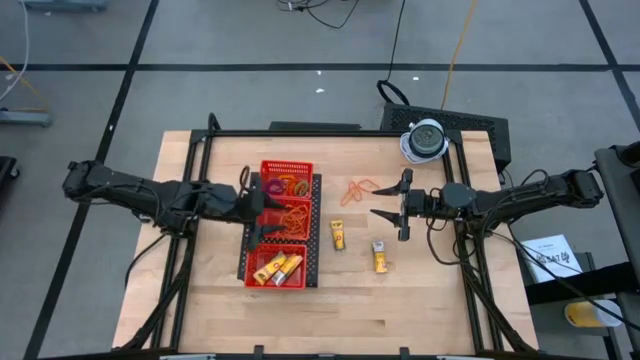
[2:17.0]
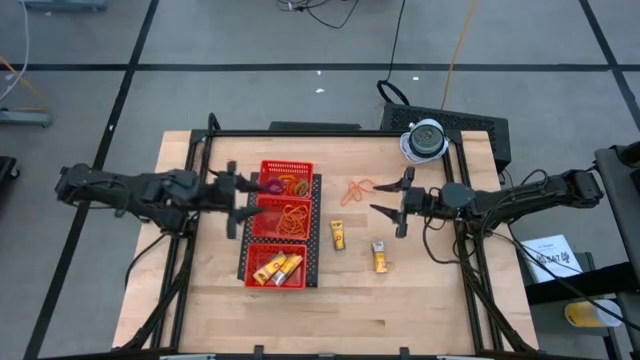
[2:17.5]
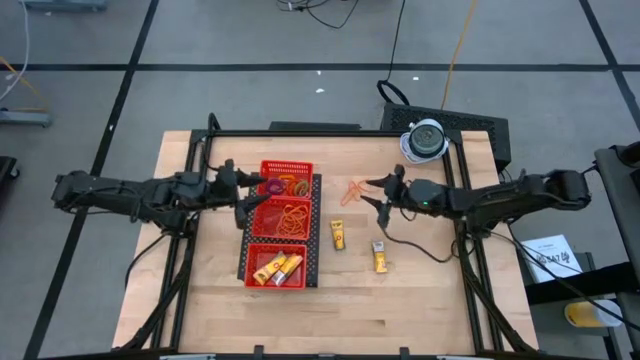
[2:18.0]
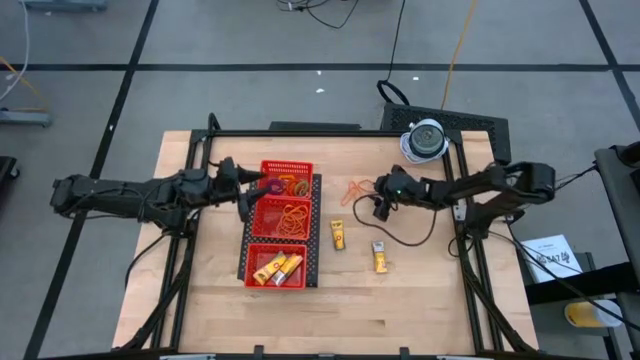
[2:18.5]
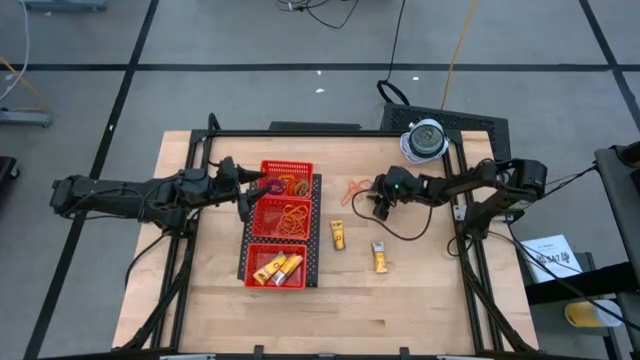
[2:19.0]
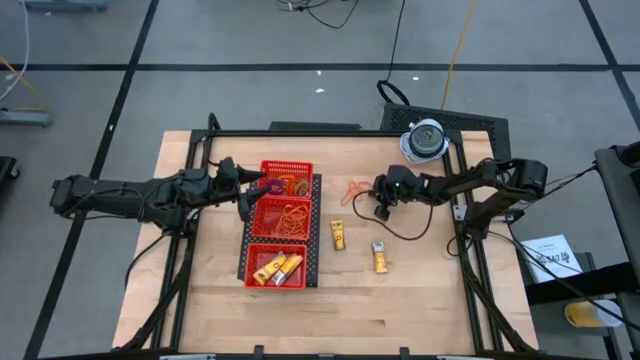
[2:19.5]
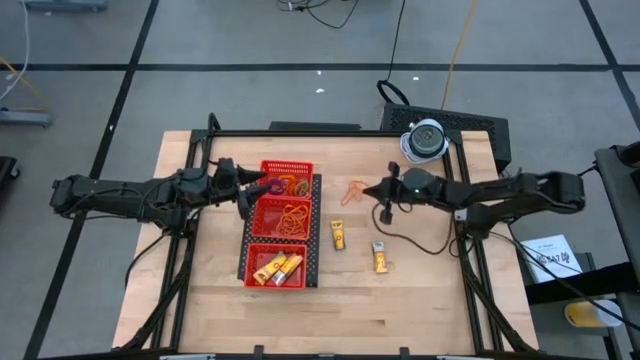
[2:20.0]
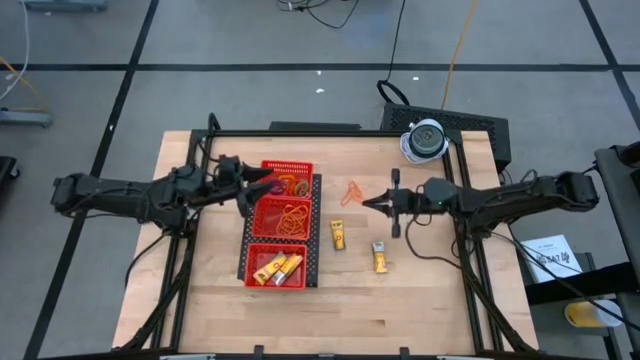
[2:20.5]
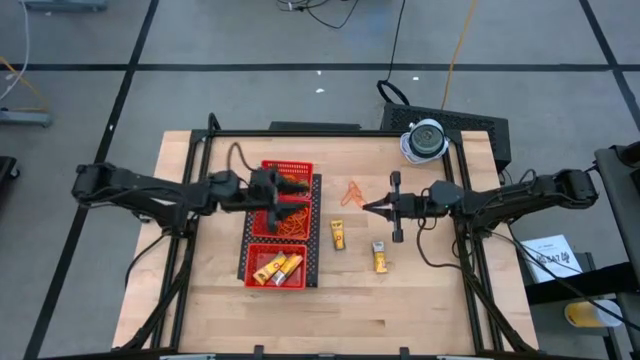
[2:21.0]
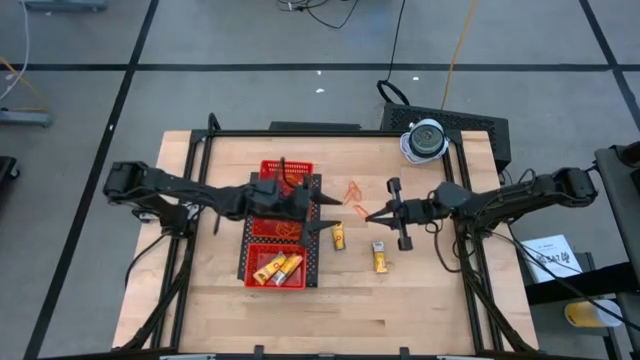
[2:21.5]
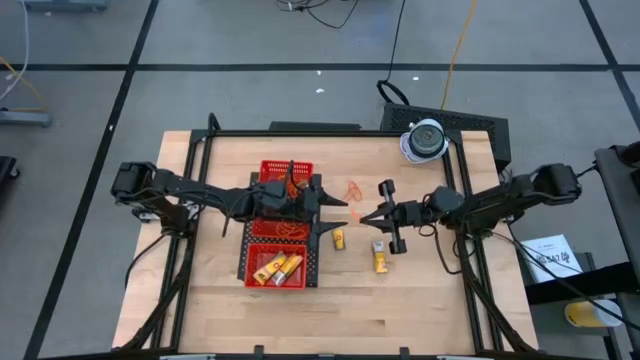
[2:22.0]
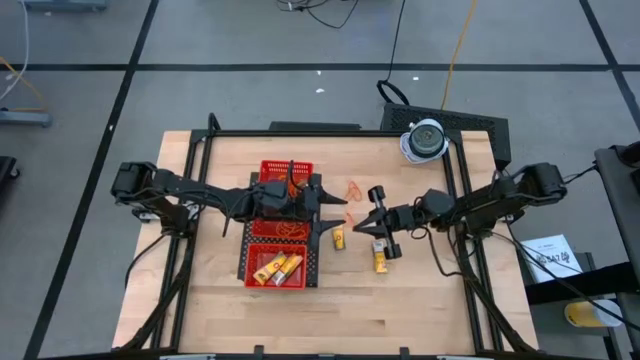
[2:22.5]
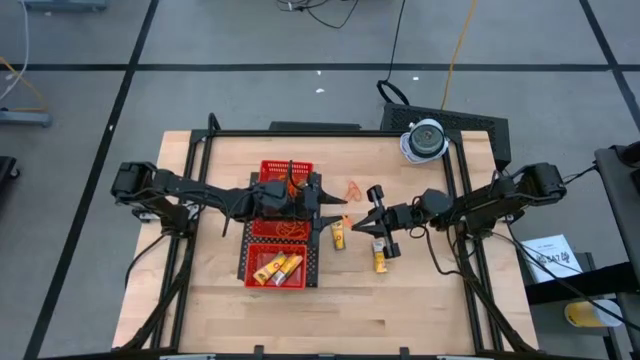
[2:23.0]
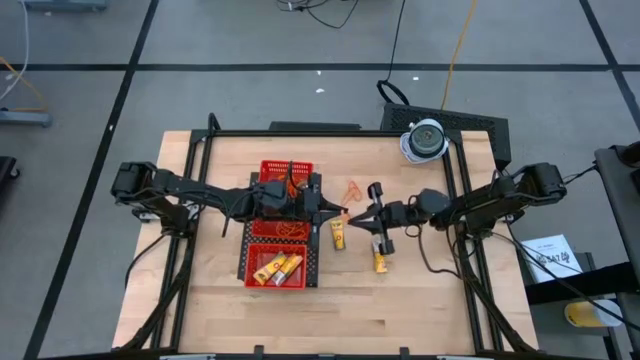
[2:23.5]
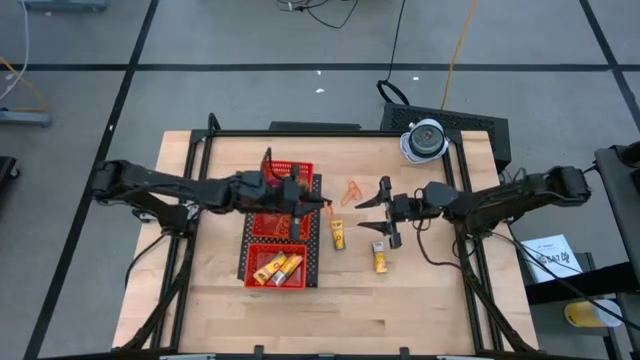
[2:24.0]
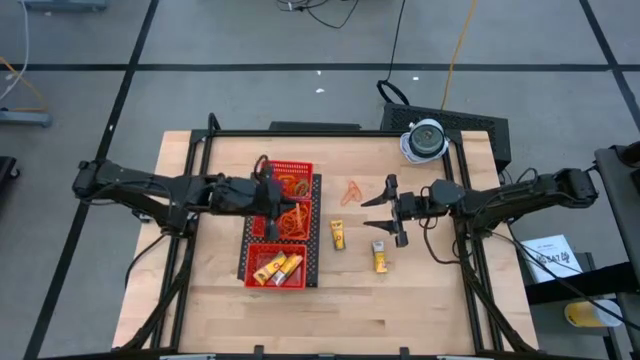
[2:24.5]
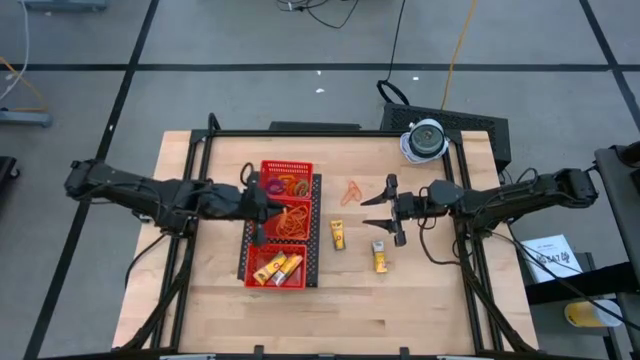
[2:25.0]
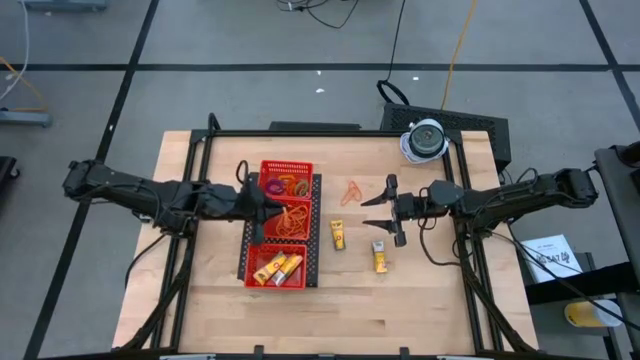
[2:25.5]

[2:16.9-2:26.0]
Task: Pick & Place Office Desk Supplies
Put the orange rubber band into the middle red basket on the shelf

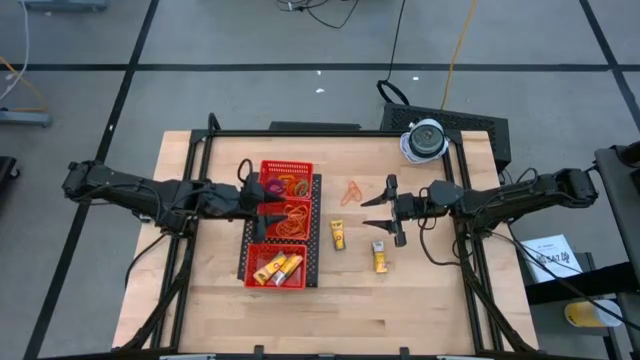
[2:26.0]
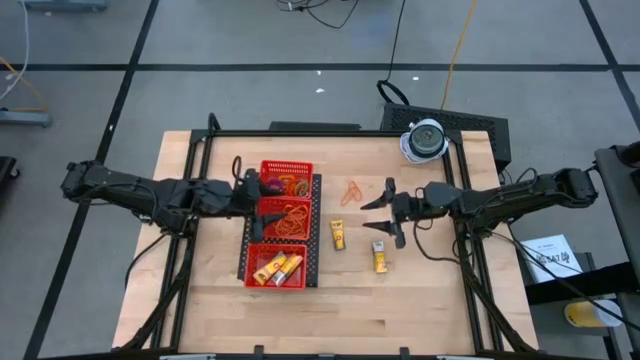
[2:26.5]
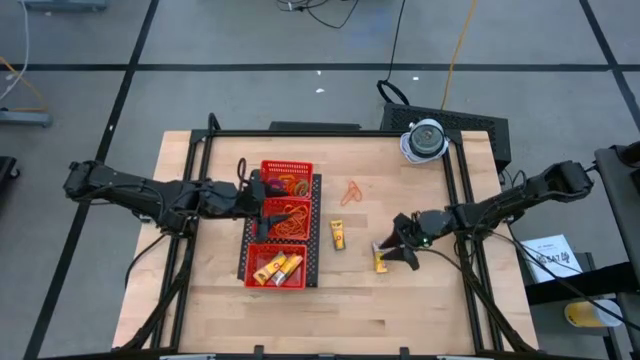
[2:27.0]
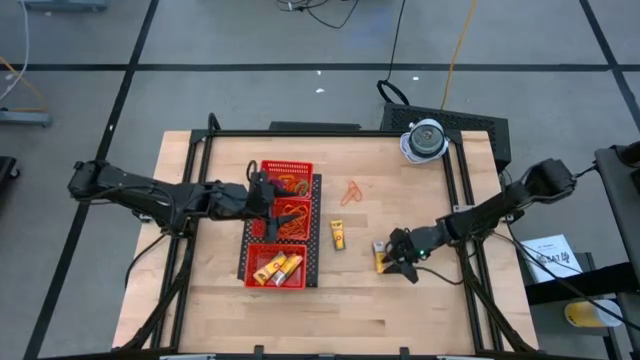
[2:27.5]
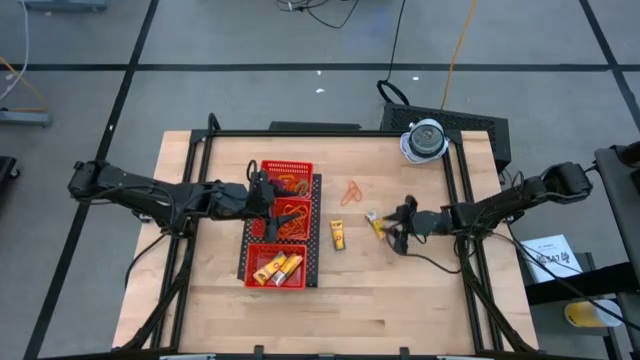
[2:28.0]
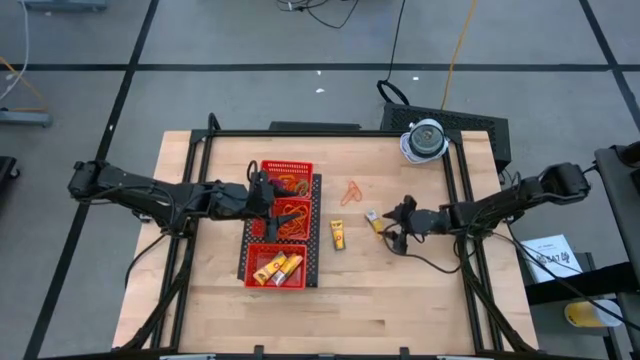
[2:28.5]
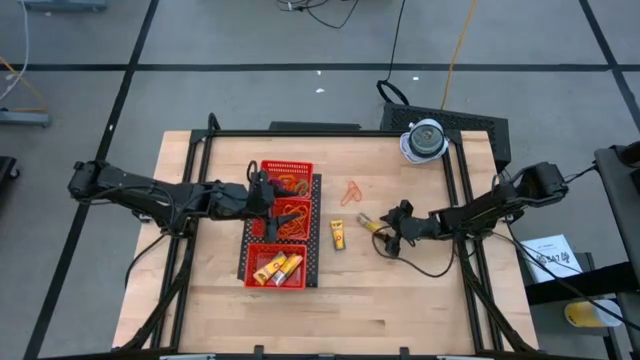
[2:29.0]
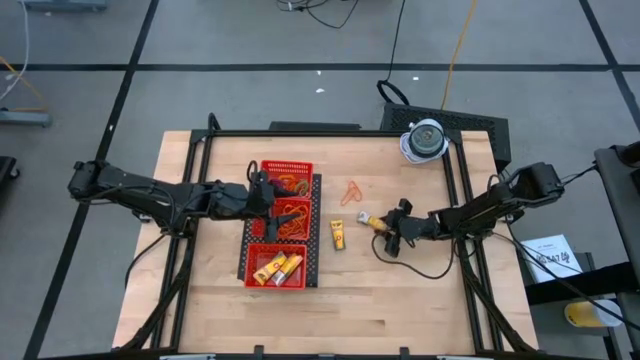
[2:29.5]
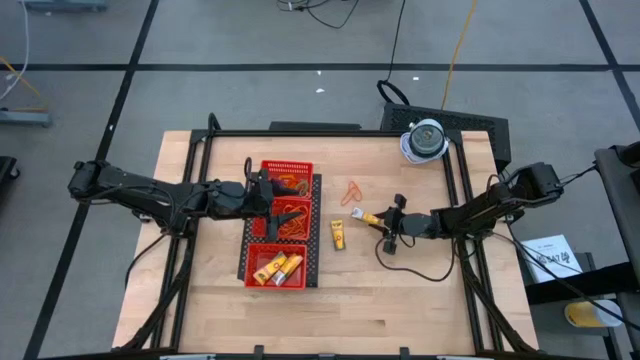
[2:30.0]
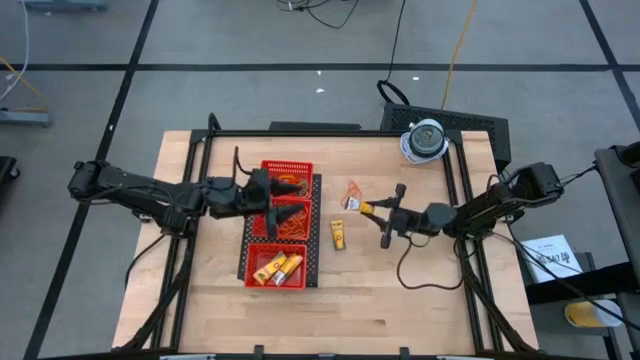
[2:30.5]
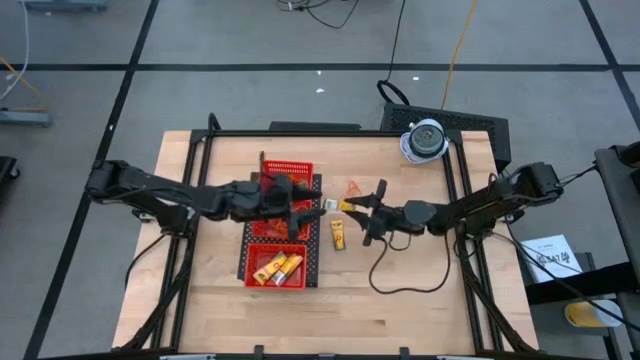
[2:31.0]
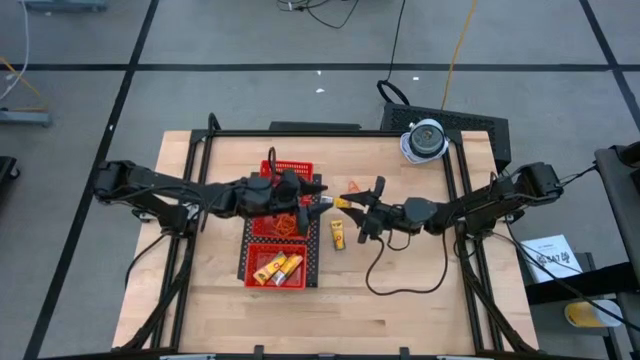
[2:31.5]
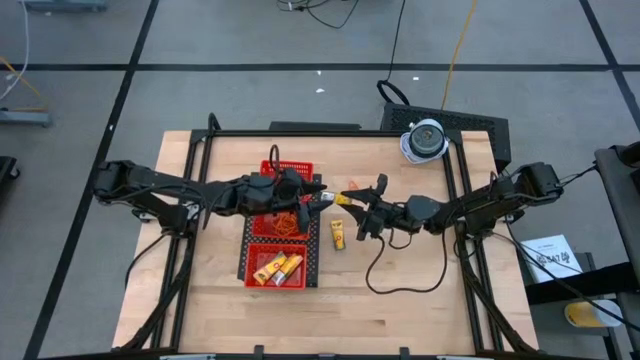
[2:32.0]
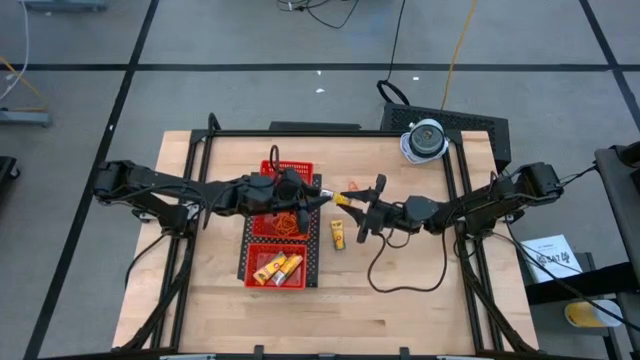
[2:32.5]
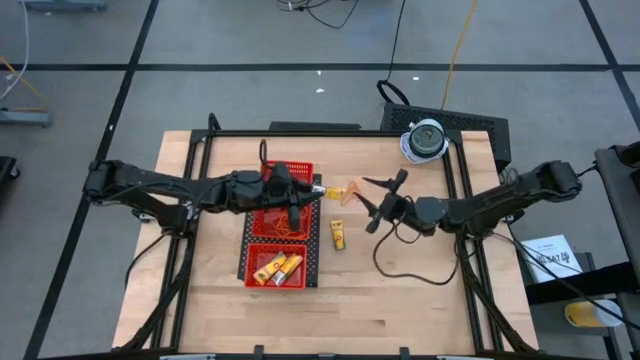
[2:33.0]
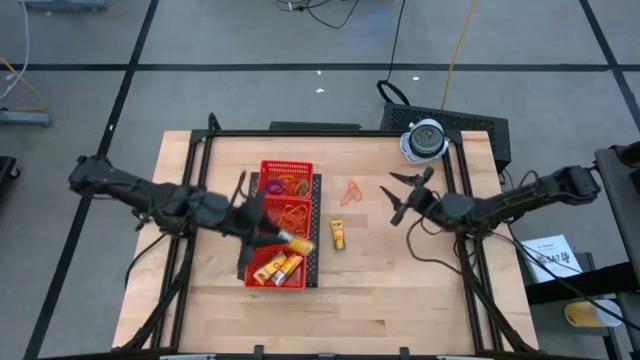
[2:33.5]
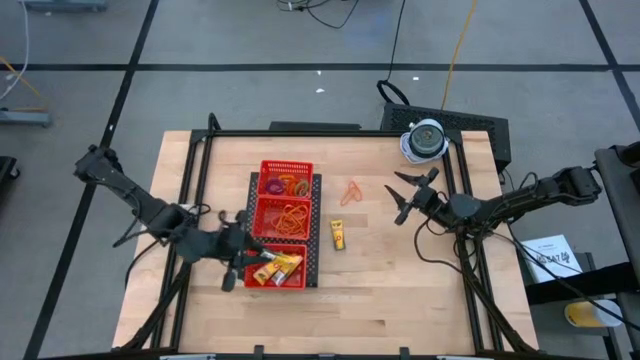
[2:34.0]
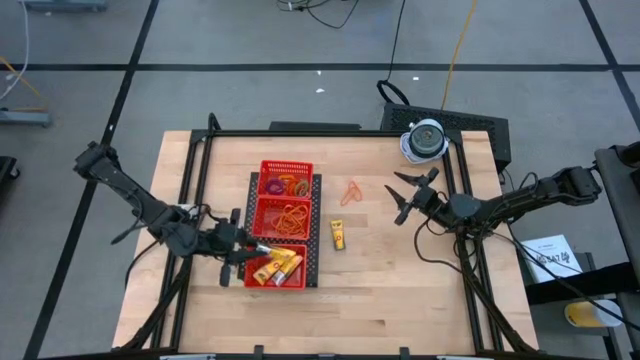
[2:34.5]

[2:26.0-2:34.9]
Put the yellow pack of crayon into the bottom red basket on the shelf

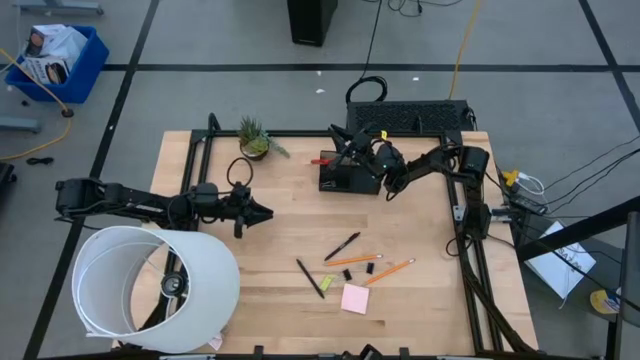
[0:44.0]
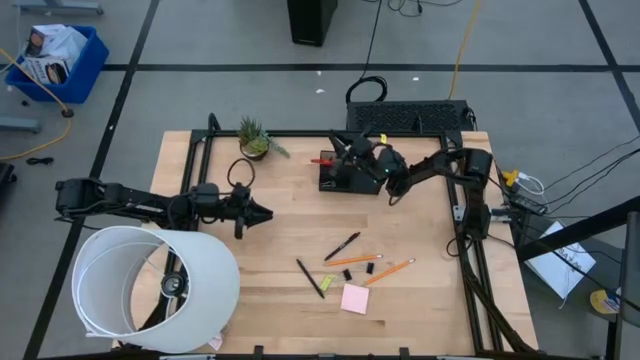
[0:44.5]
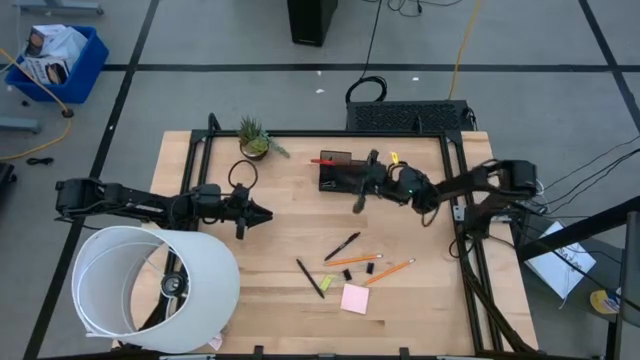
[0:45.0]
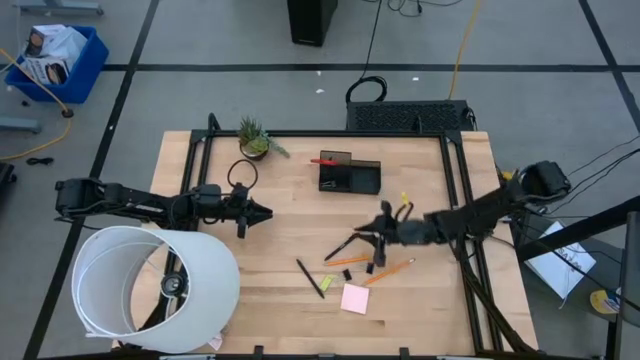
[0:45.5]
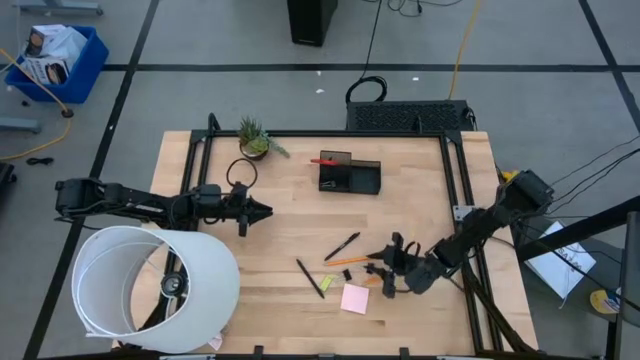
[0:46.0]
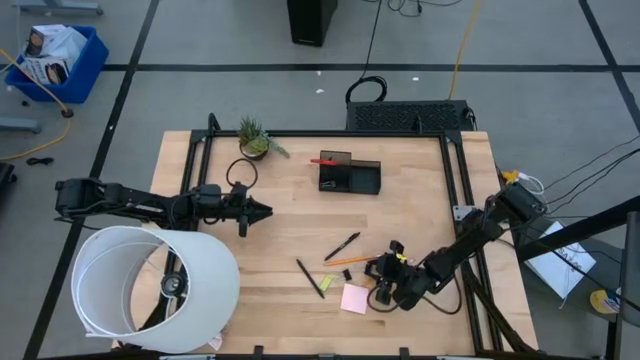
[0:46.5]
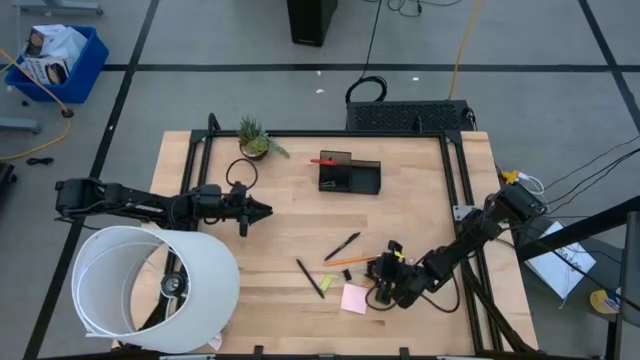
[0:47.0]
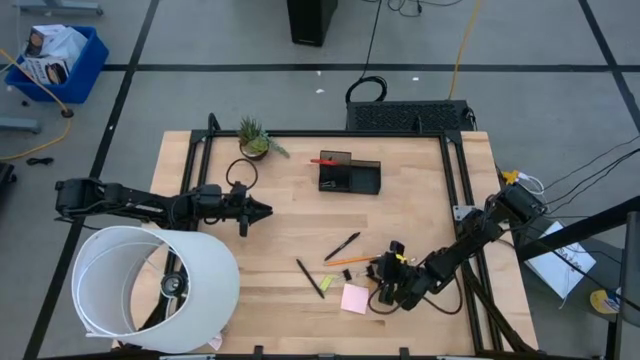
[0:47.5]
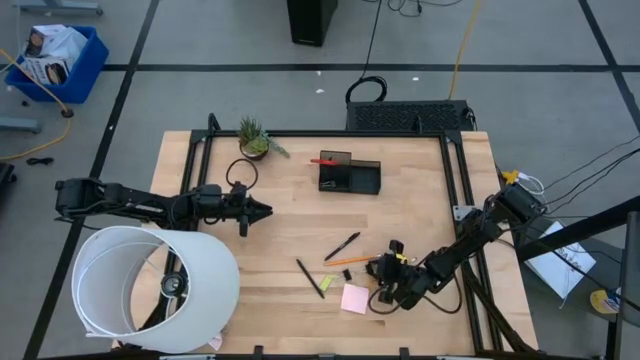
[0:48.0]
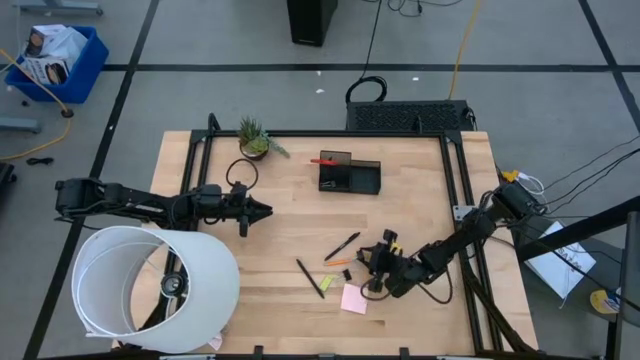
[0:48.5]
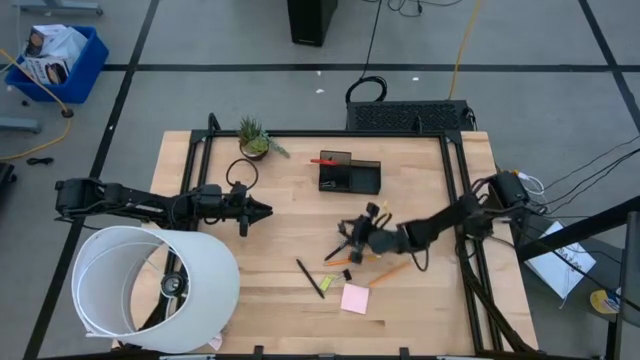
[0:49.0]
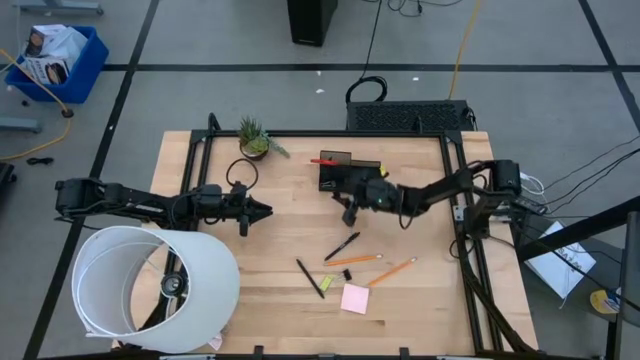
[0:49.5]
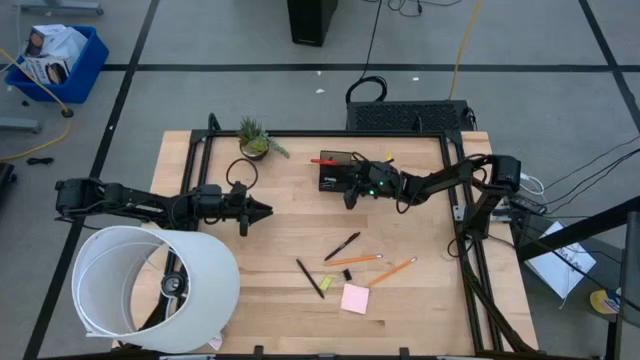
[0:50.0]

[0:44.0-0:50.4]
Task: Pick and place office supplies into organizer
Put the binder clip into the desk organizer
